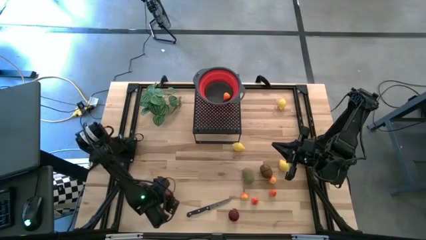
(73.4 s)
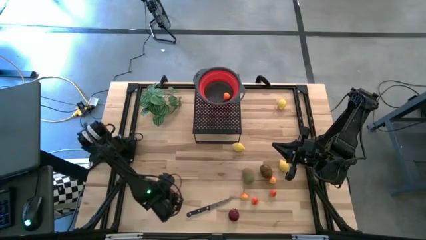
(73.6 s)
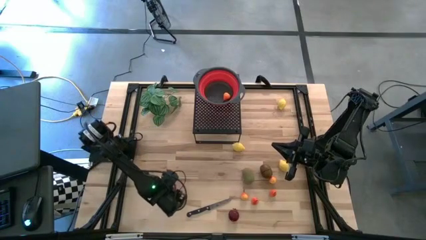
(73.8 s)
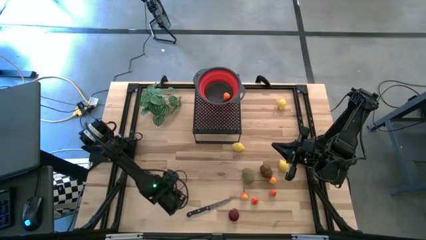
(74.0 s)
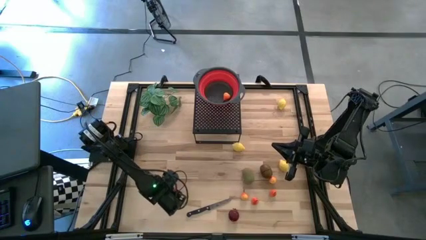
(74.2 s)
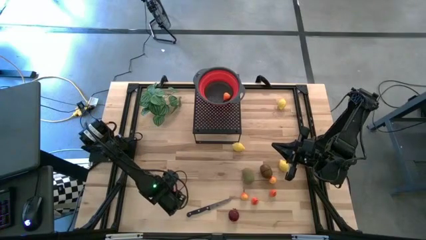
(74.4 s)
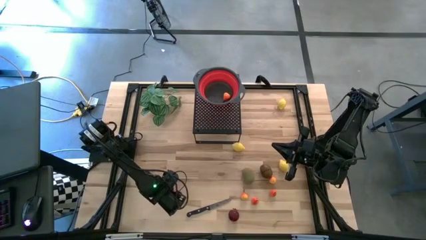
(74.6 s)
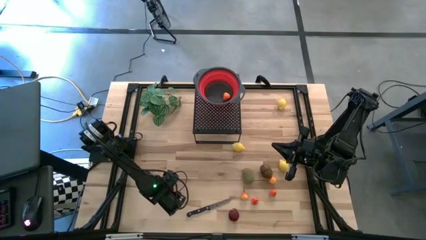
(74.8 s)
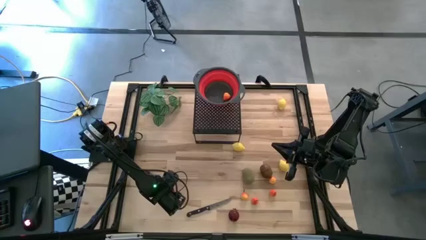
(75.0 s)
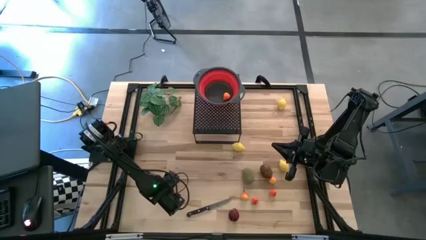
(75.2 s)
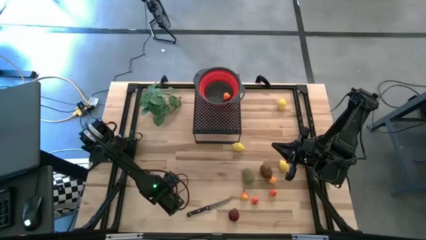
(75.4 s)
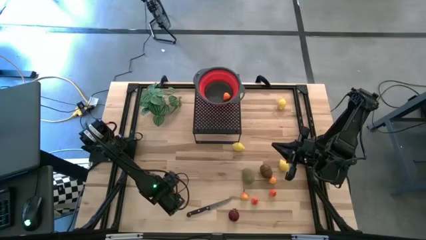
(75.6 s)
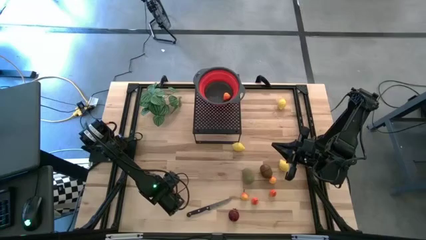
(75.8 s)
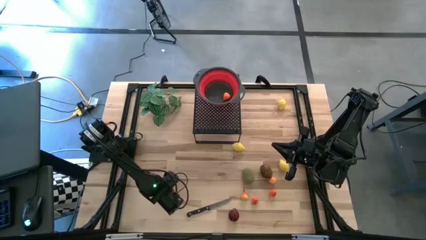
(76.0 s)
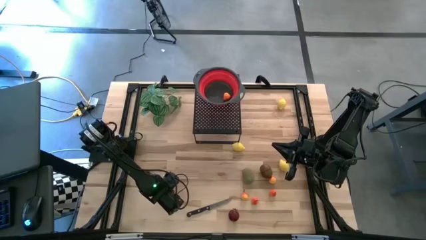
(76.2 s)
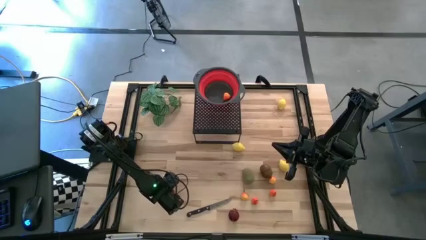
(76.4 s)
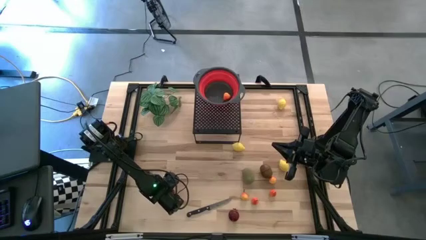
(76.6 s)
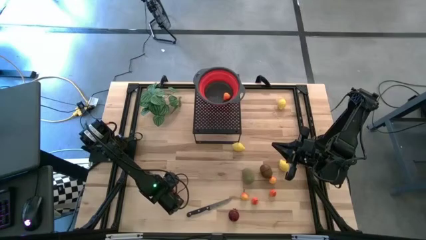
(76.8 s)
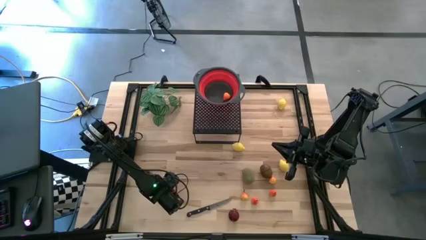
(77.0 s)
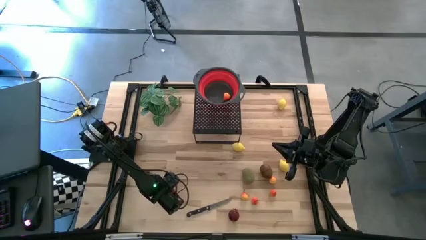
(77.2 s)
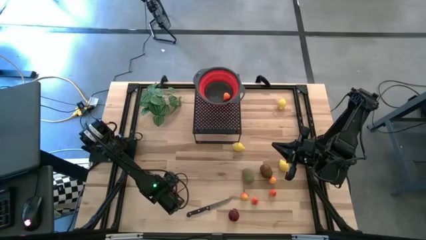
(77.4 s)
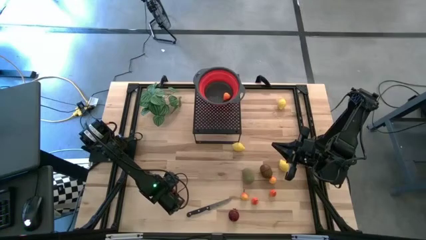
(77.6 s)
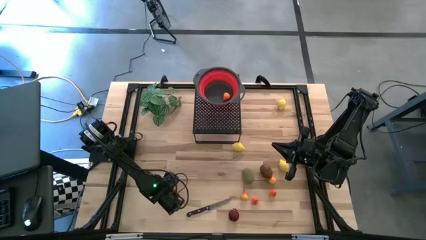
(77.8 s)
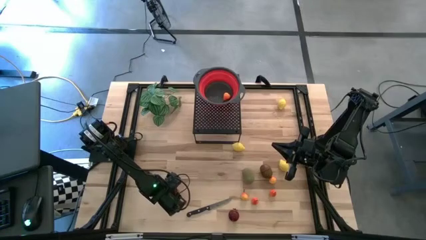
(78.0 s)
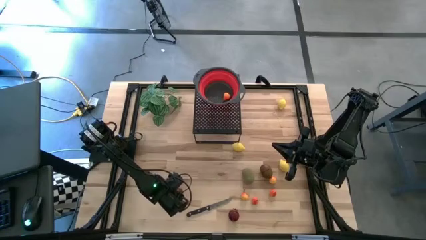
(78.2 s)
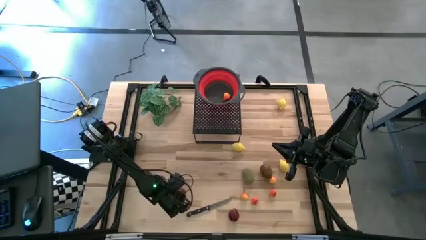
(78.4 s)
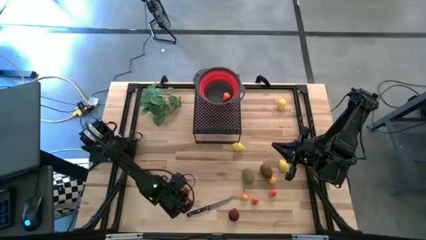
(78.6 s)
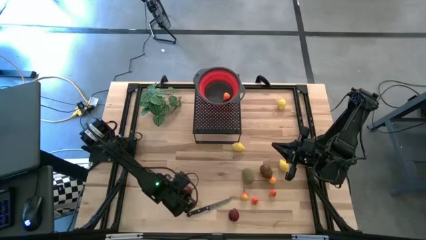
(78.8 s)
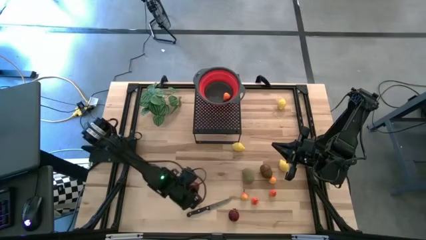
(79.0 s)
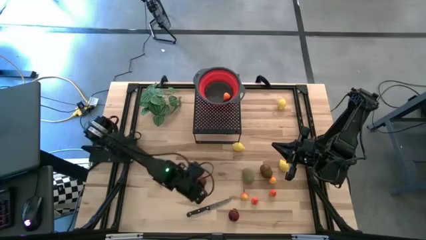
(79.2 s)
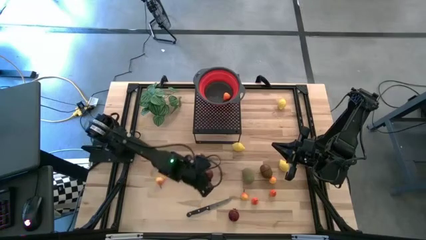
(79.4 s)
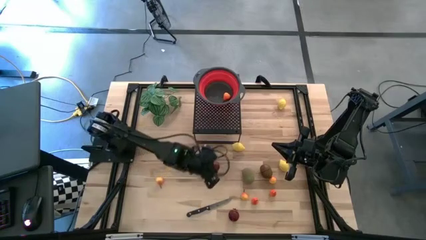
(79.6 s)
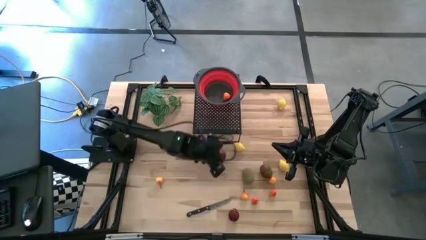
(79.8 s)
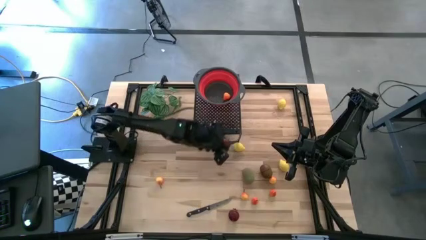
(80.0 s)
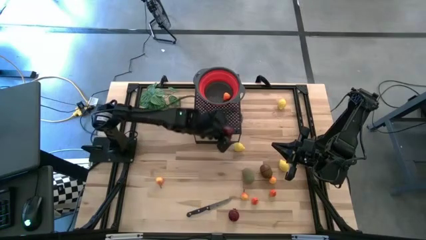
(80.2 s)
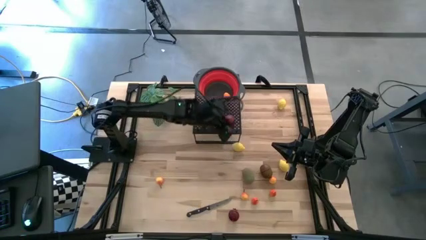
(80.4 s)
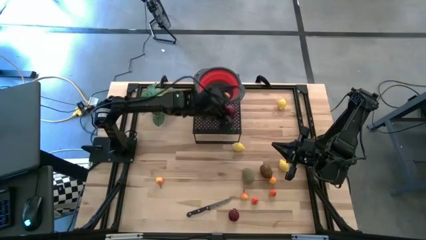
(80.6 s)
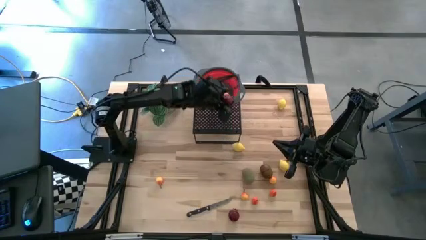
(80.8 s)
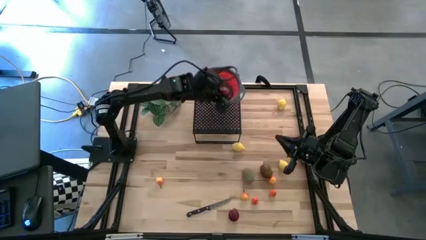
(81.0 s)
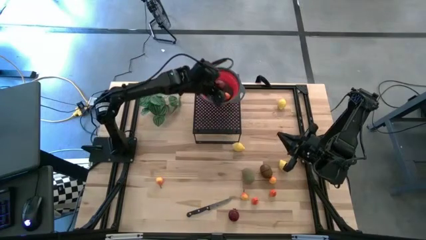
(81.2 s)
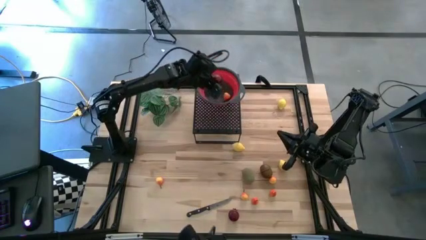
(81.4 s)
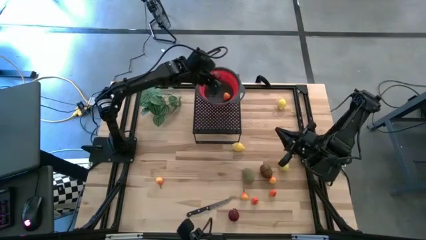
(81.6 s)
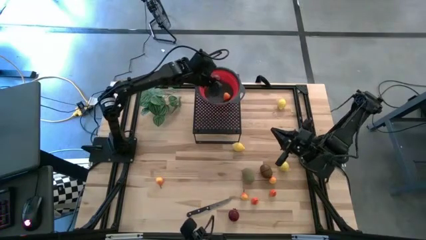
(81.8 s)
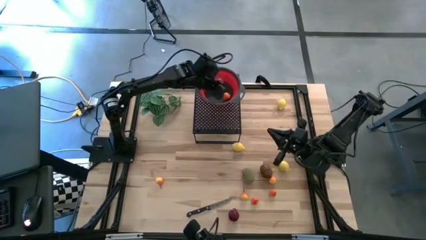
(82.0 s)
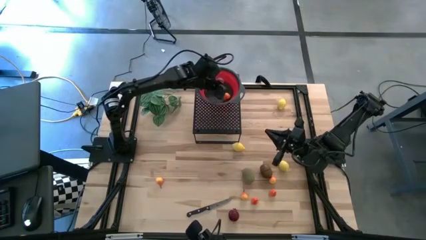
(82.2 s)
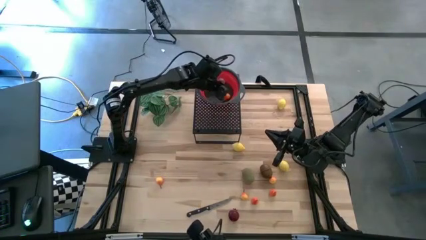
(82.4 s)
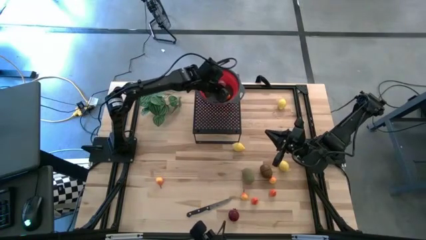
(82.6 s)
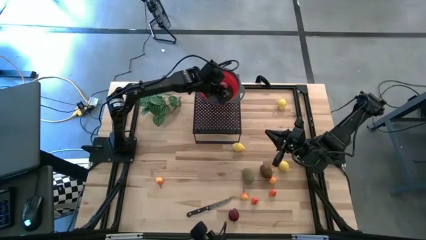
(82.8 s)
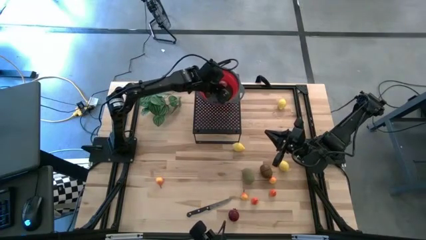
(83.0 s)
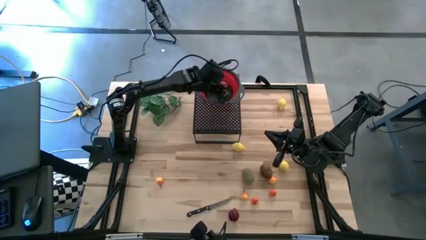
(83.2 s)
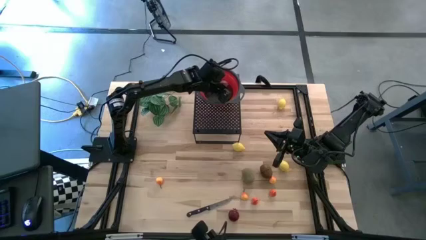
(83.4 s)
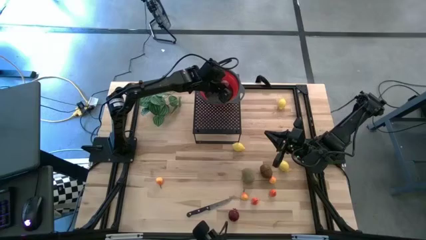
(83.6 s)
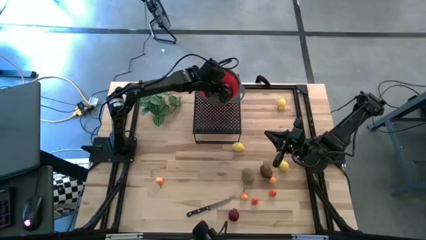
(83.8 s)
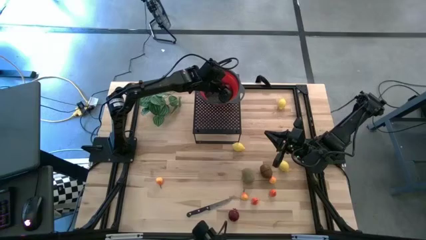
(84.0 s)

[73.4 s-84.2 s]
Task: Pick & Place Fruit
Put the left pomegranate into the red strainer bowl
